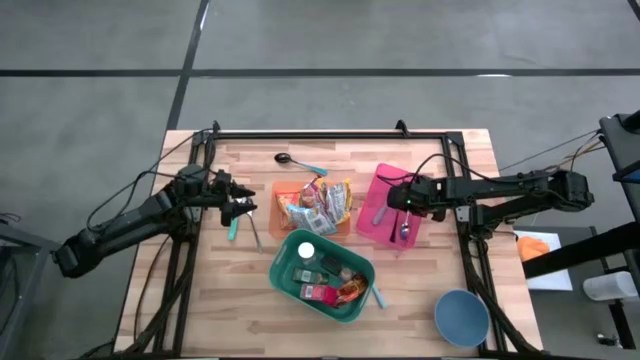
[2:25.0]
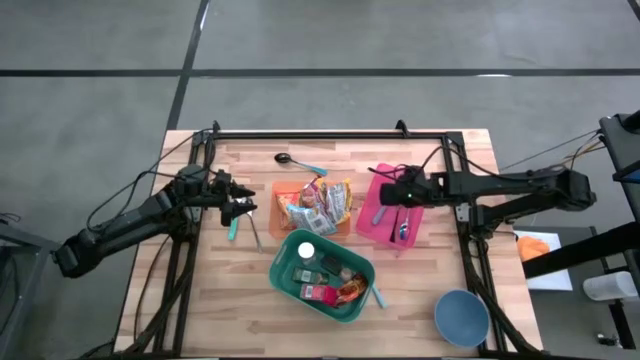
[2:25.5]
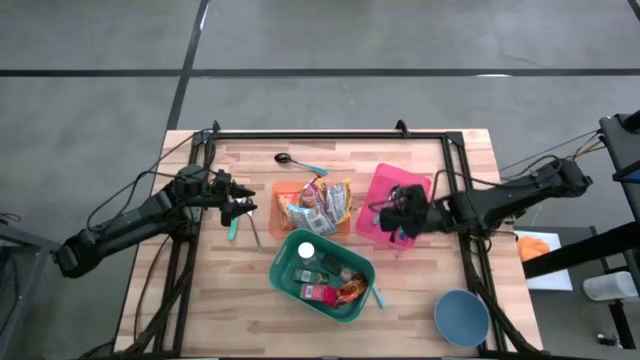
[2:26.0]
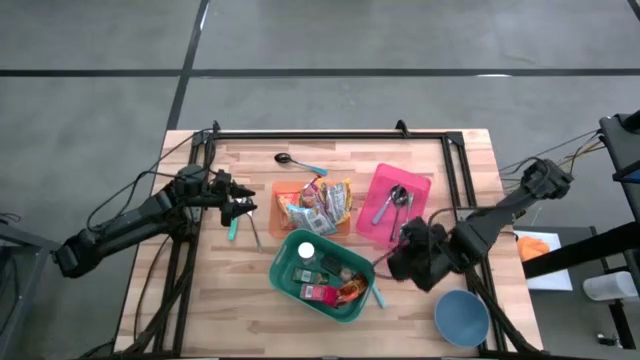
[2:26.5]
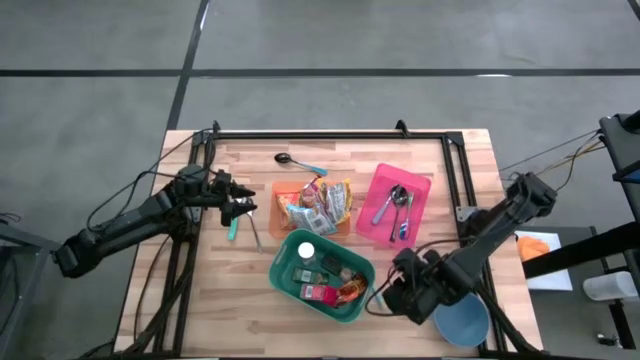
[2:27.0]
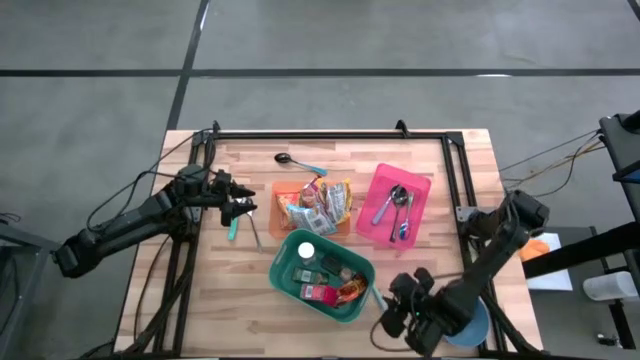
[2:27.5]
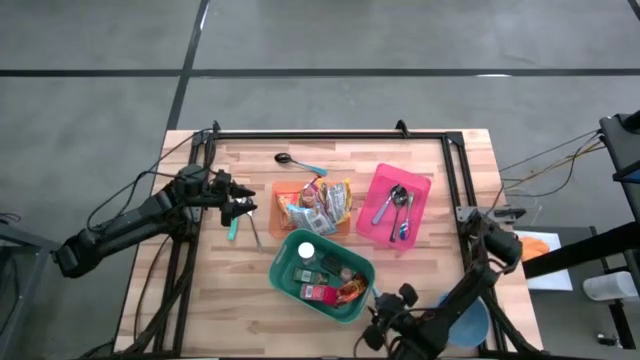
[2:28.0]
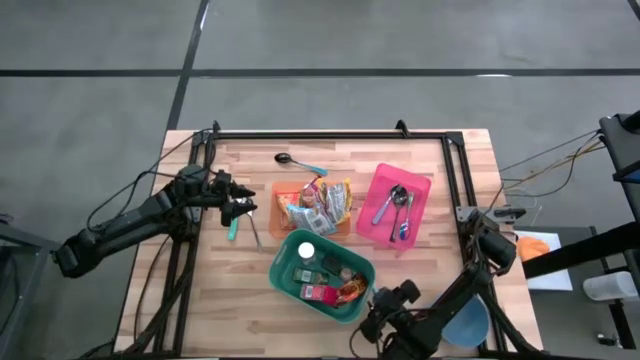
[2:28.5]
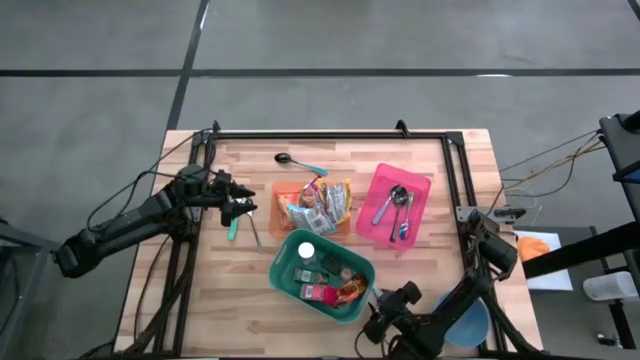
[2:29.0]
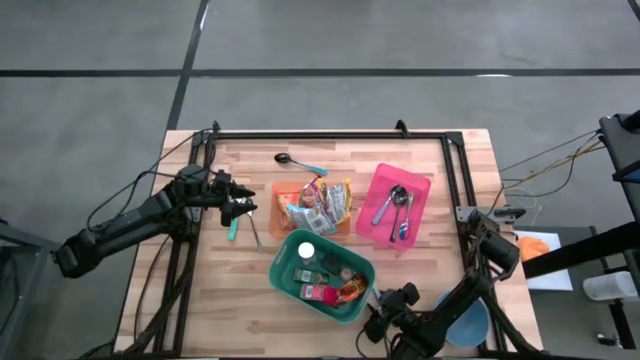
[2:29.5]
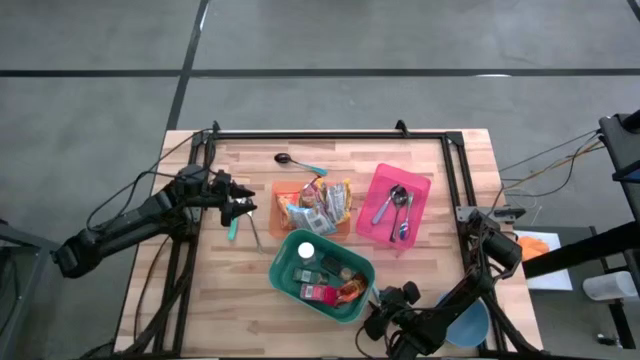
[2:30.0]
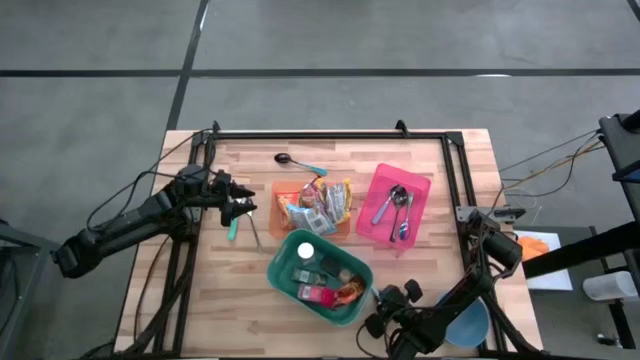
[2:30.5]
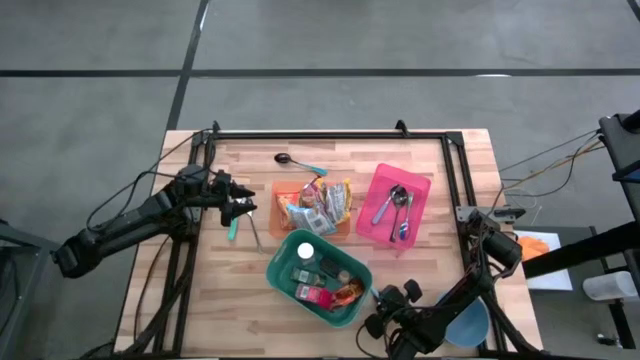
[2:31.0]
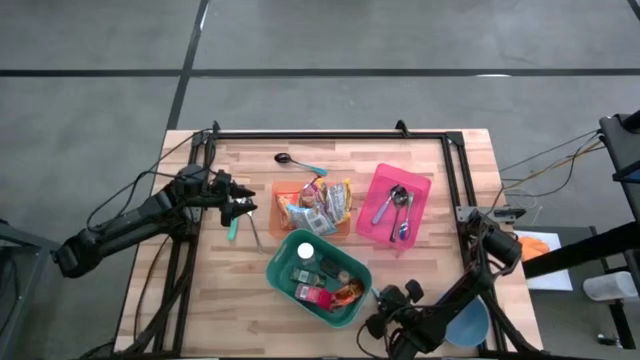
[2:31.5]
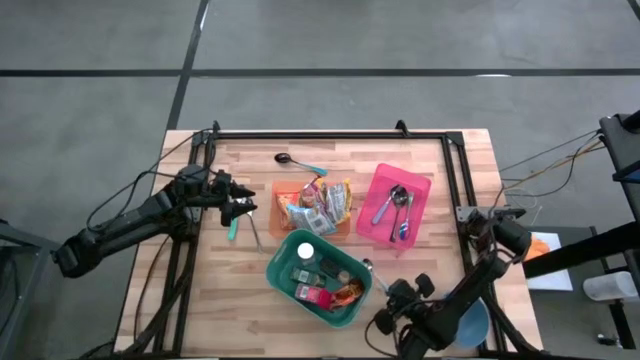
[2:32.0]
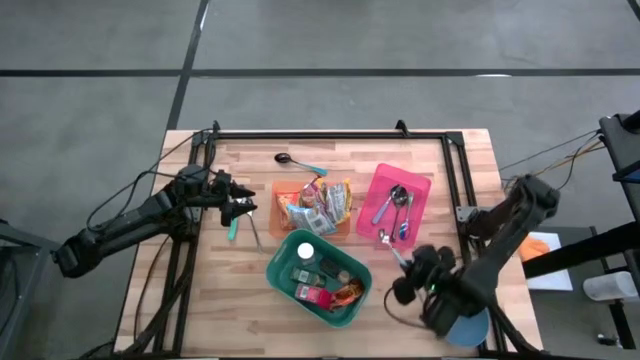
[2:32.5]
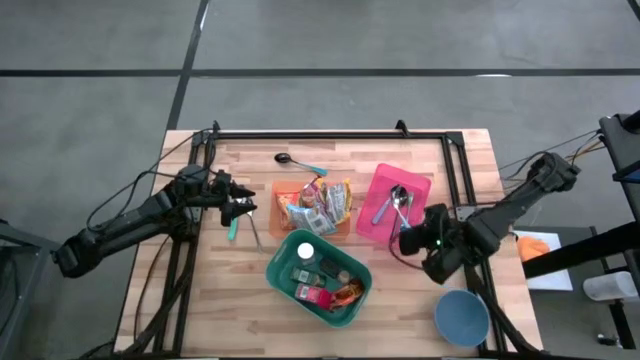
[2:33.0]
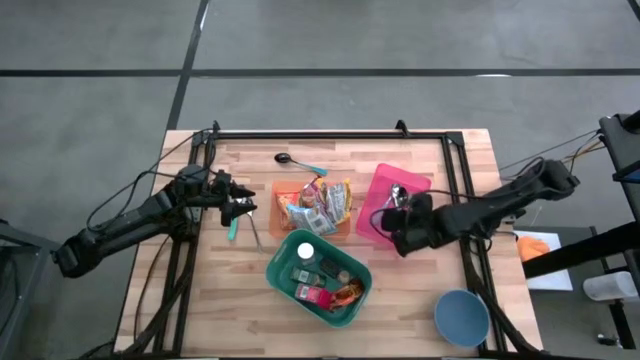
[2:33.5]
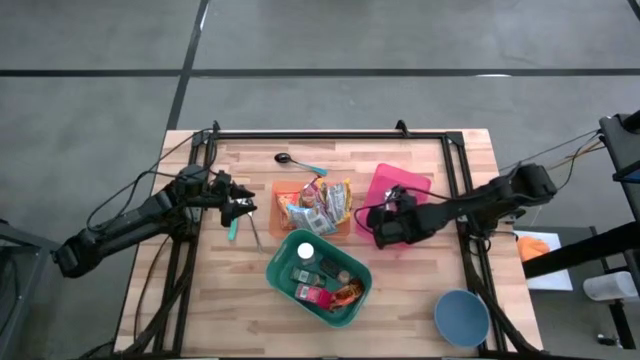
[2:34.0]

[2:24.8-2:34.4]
Put the bottom light blue spoon into the pink bin

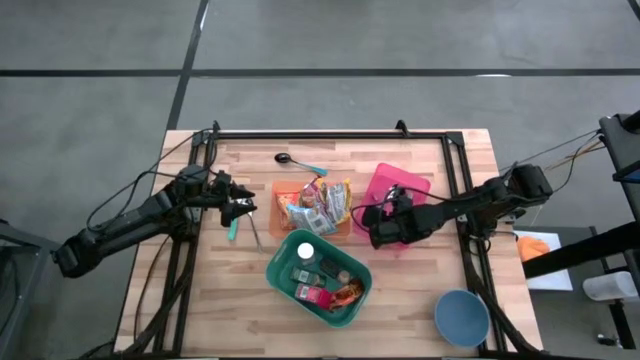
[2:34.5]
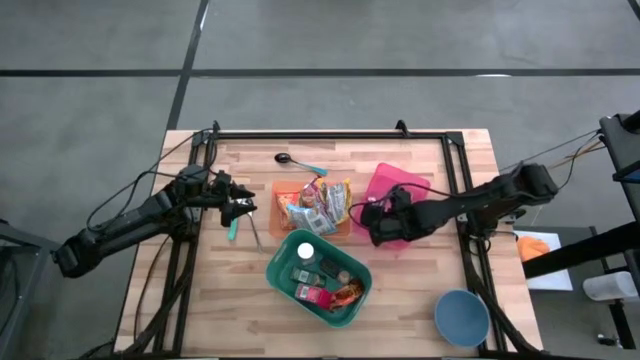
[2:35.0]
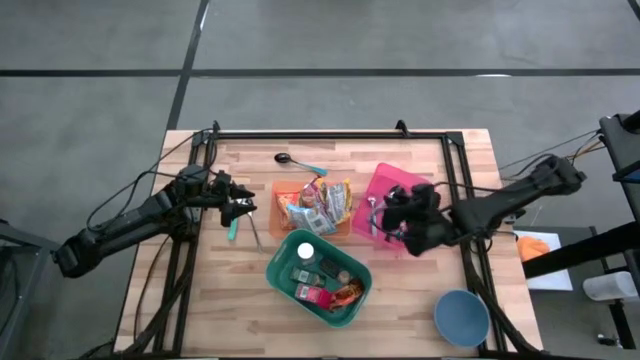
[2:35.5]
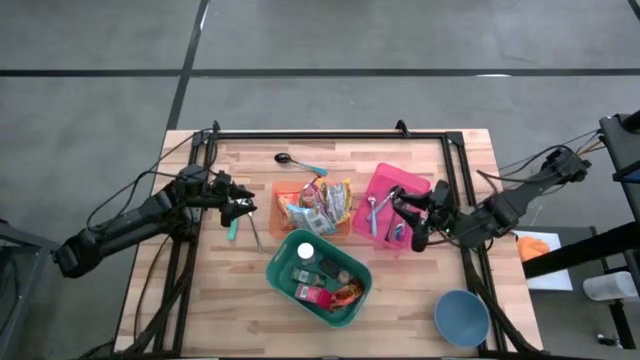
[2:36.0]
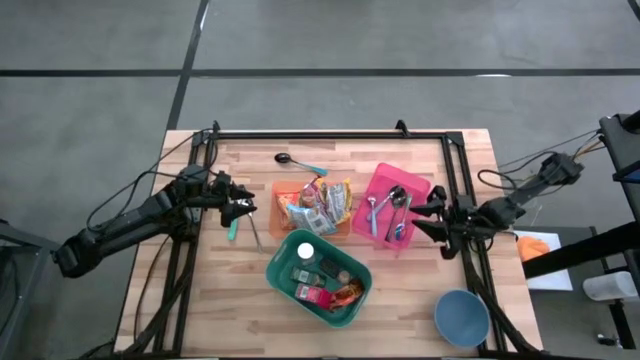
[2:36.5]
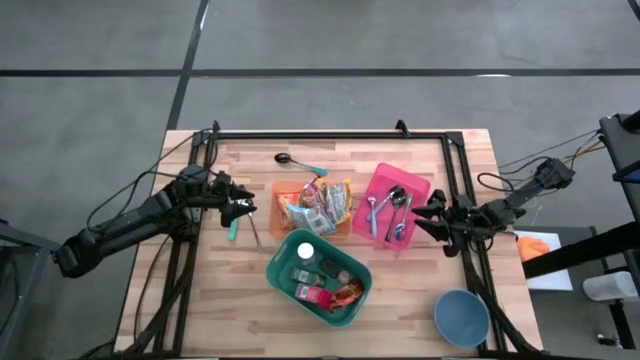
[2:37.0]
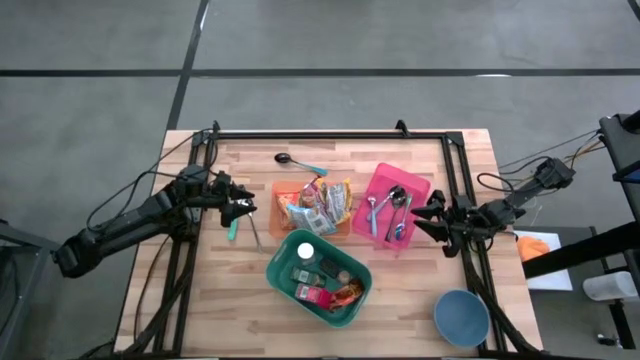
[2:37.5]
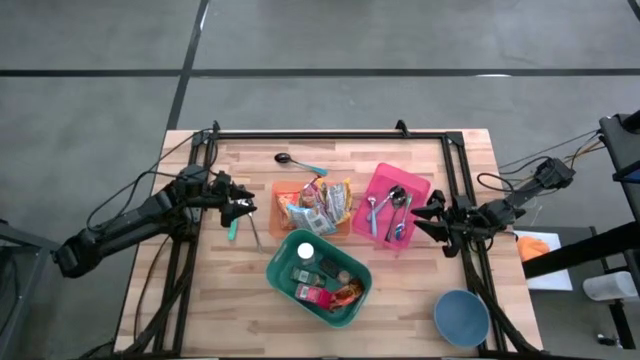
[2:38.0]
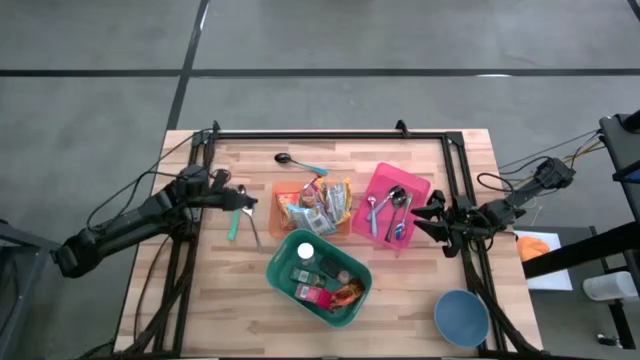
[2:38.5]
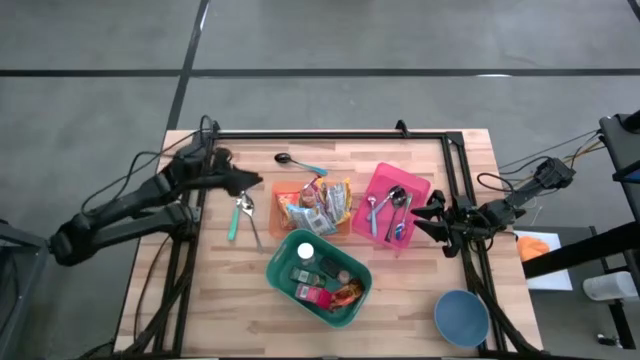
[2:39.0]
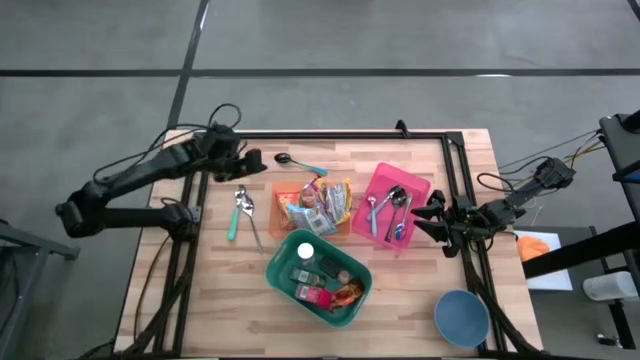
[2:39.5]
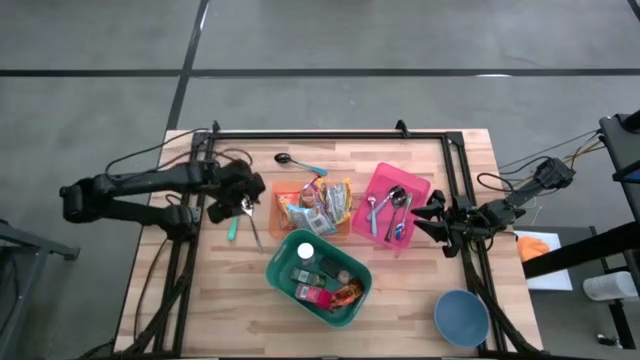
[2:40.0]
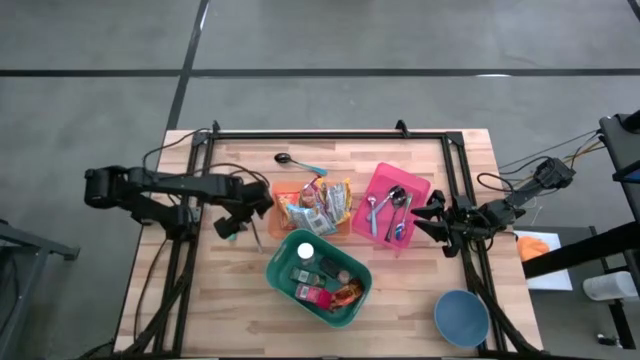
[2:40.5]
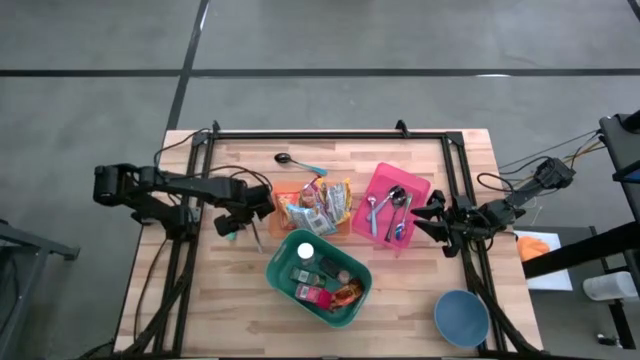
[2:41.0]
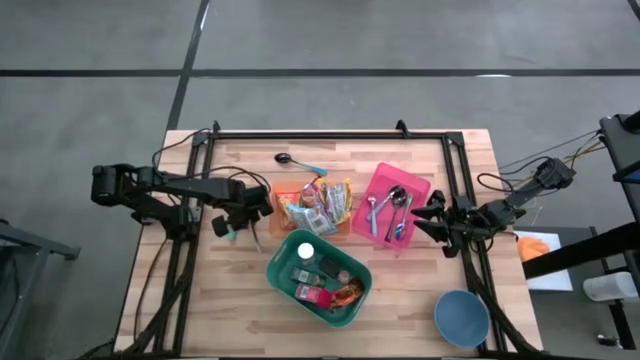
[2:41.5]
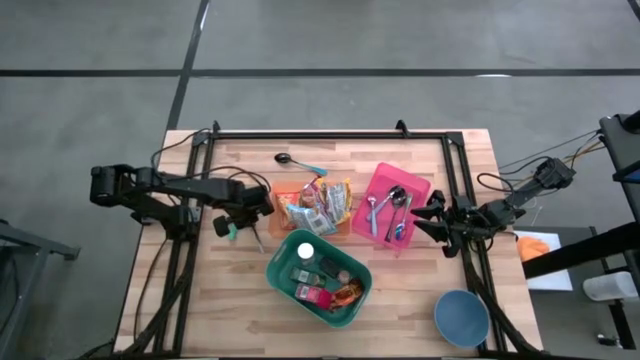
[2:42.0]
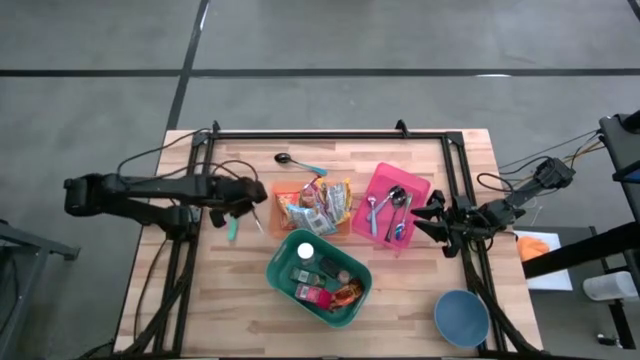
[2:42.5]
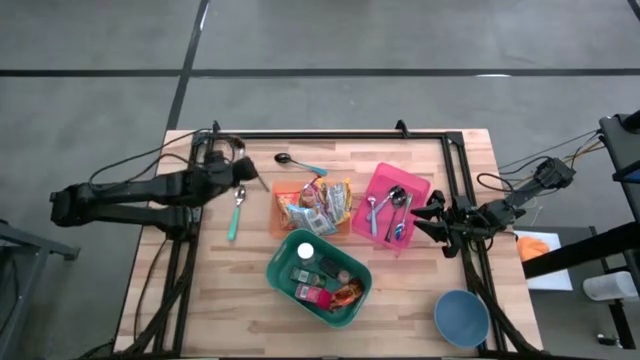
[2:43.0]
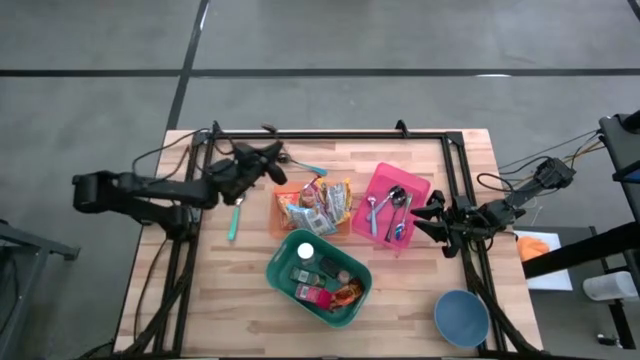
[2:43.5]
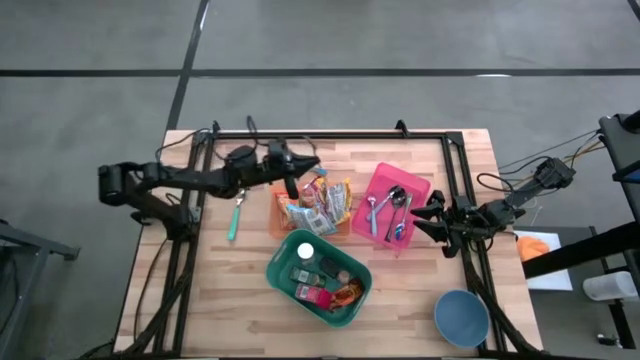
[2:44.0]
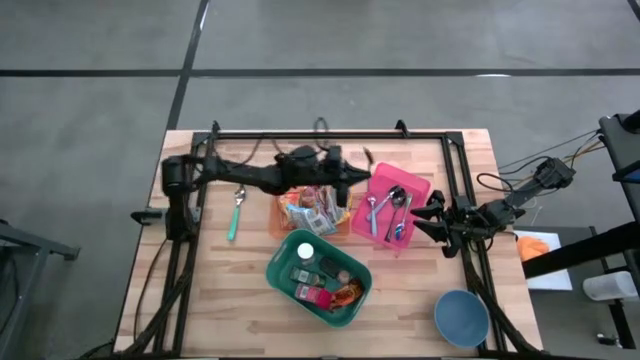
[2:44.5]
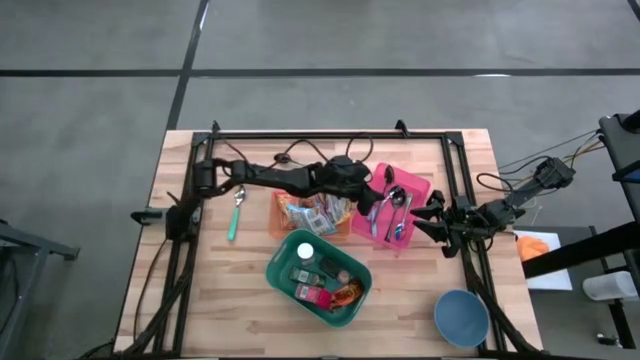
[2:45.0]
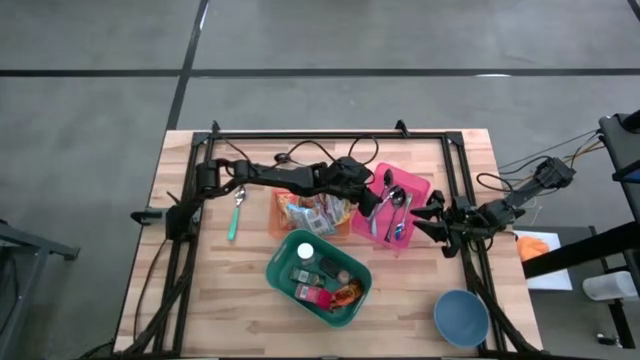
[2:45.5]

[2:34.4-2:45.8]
Put the silver spoon into the pink bin
